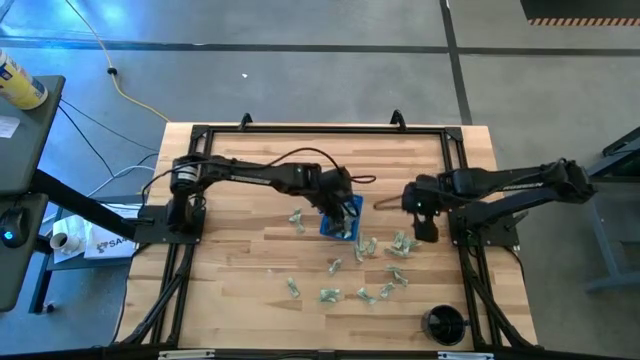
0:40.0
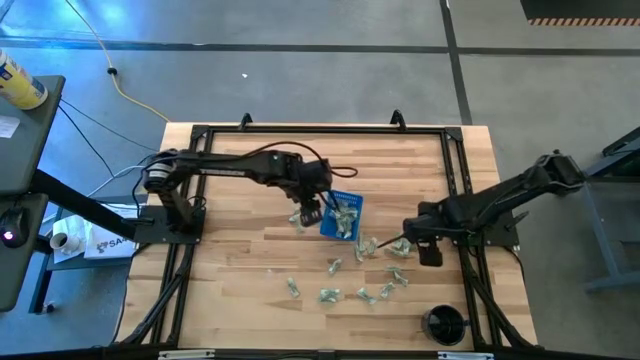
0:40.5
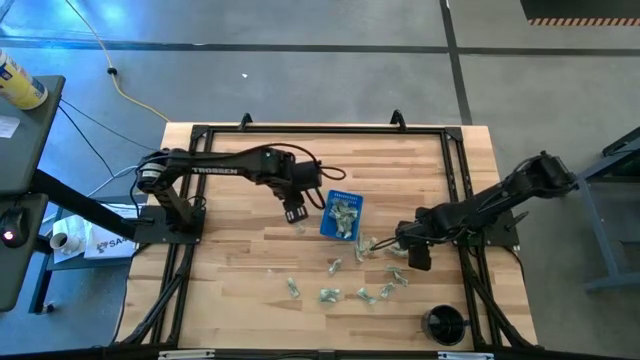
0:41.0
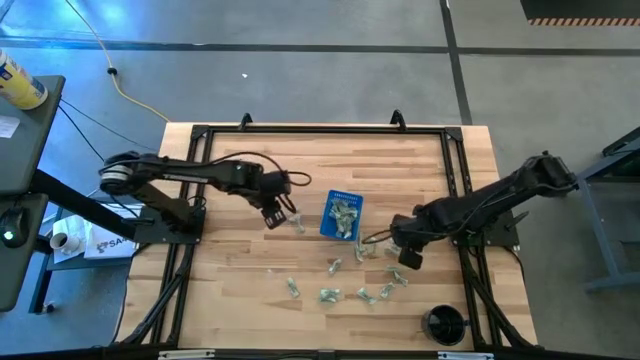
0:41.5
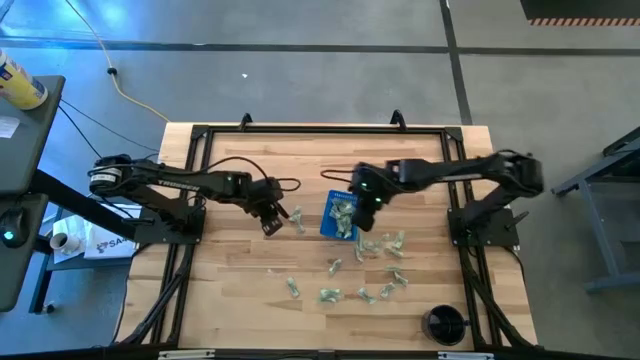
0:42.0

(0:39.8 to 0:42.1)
Task: Pick and place Stevia / Truvia into bins
Put the stevia packet into the blue basket

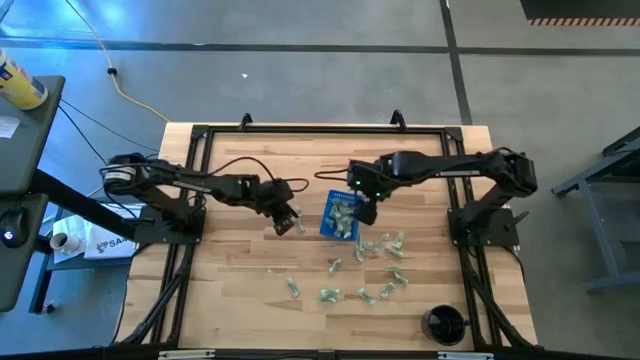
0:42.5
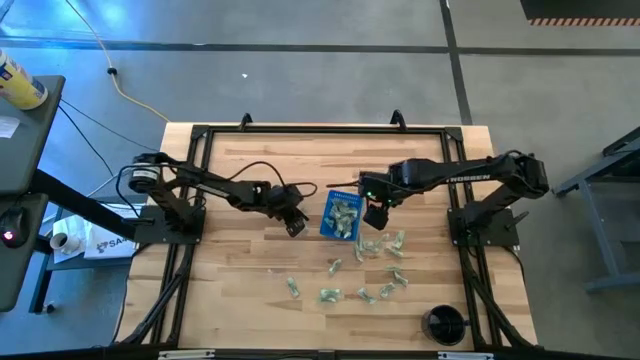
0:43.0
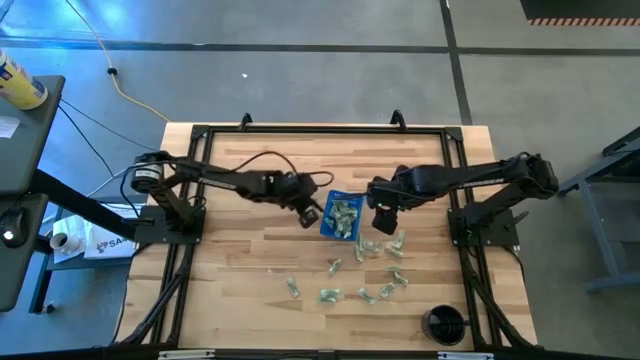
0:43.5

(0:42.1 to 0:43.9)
Put the stevia packet into the blue basket

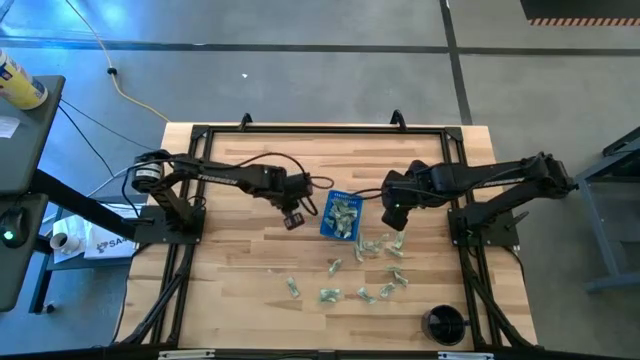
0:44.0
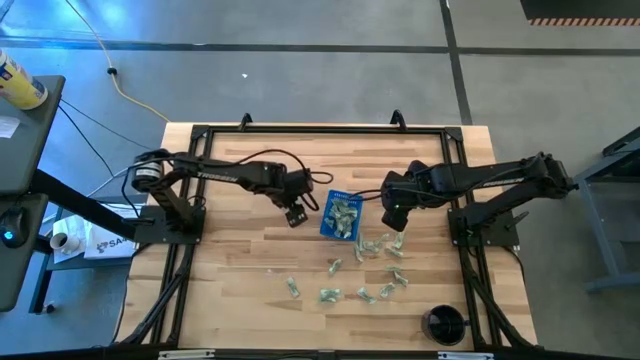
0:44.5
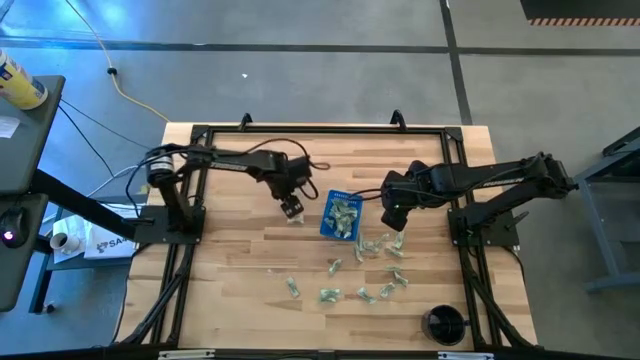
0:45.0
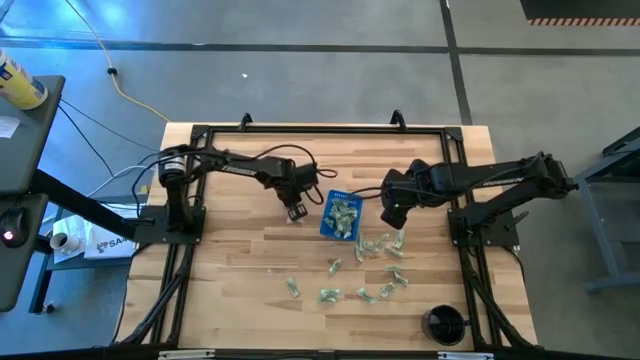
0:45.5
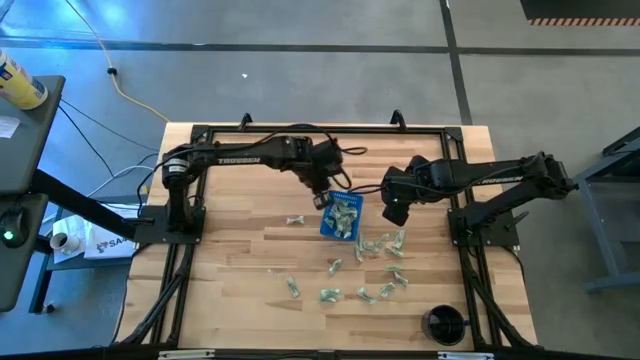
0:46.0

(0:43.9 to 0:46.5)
Put the stevia packet into the blue basket

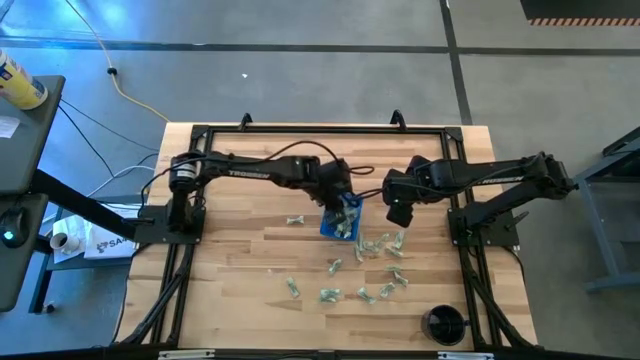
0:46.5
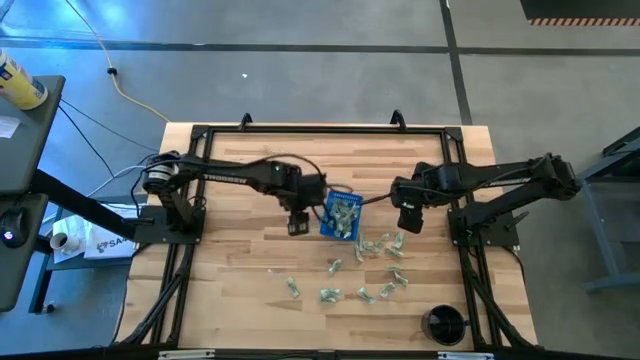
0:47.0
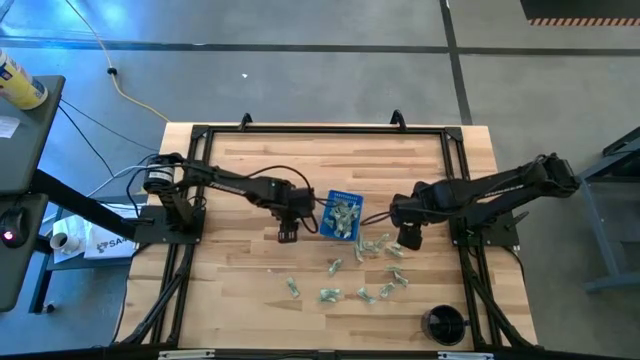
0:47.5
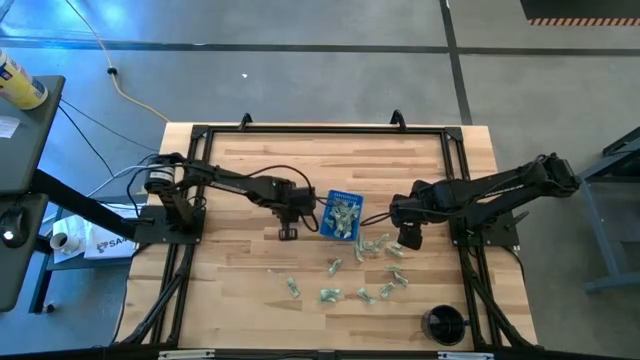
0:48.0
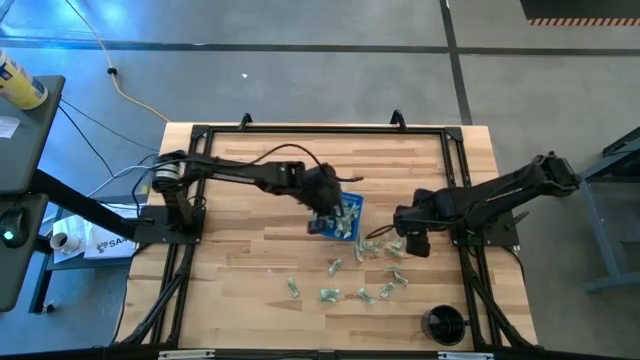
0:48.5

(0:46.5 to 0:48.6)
Put the stevia packet into the blue basket

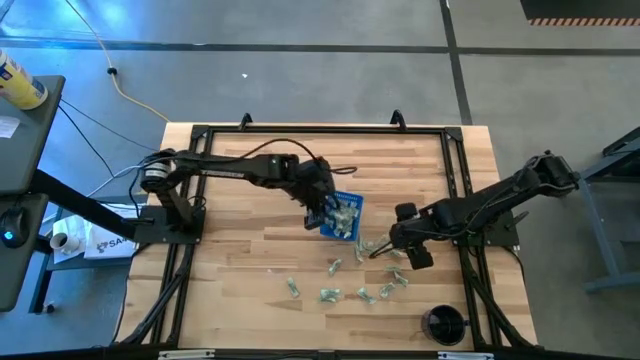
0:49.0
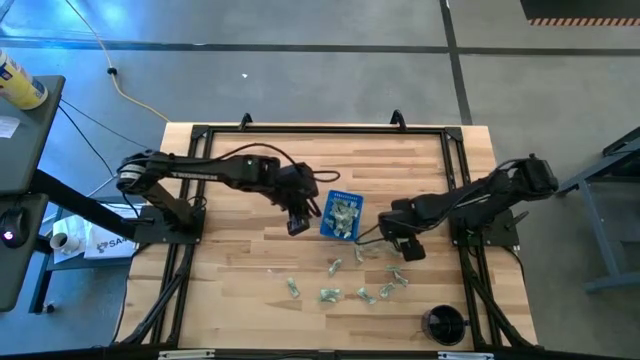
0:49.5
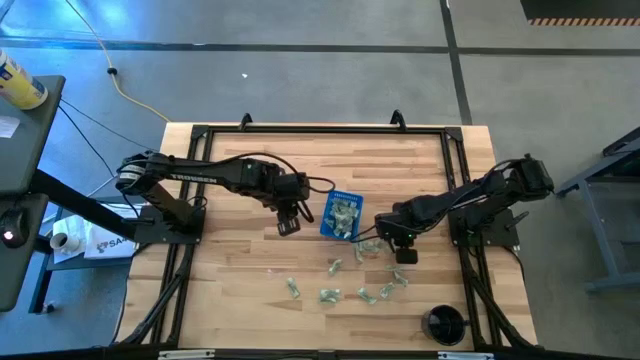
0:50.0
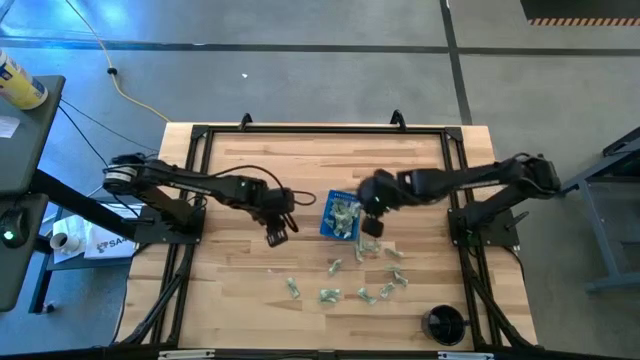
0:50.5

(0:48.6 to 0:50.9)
Put the stevia packet into the blue basket

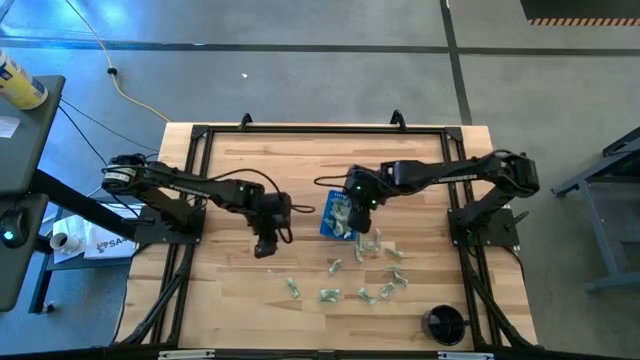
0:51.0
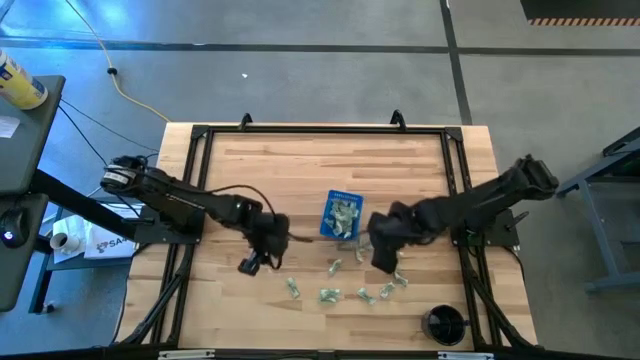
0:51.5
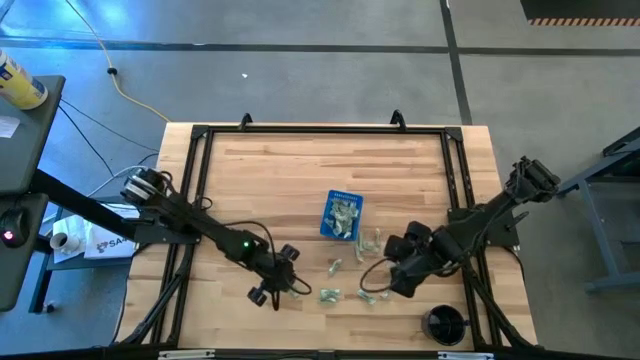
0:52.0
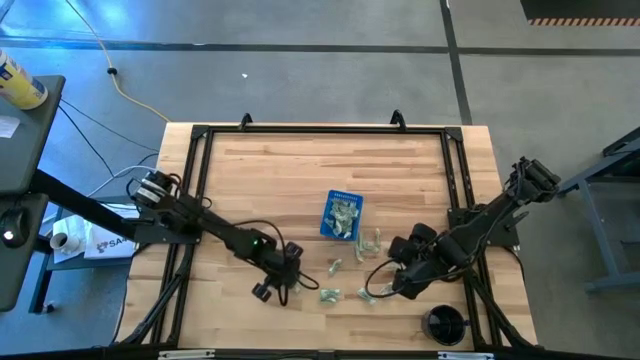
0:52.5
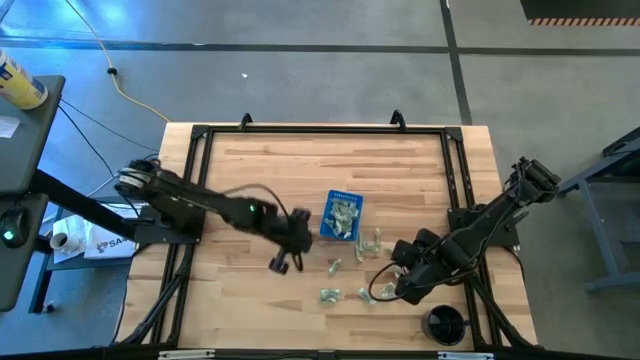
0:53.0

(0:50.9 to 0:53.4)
Put the stevia packet into the blue basket

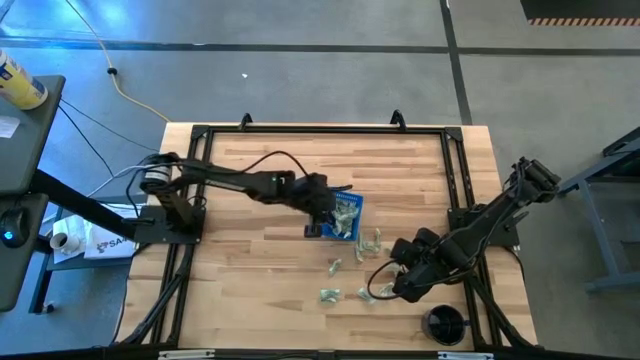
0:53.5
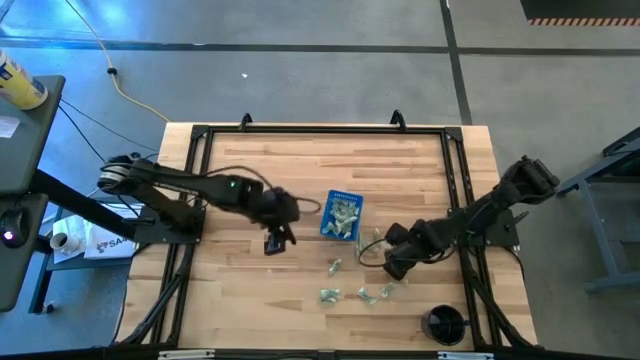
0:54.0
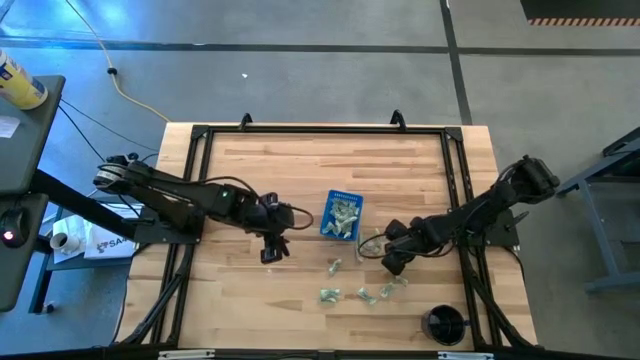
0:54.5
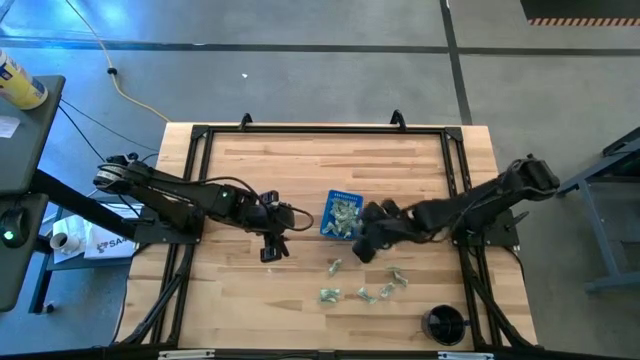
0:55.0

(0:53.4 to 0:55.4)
Put the stevia packet into the blue basket

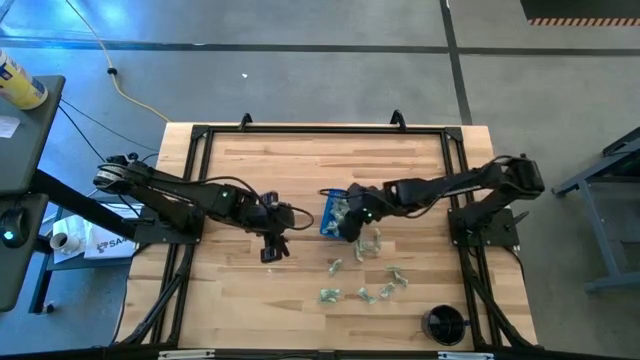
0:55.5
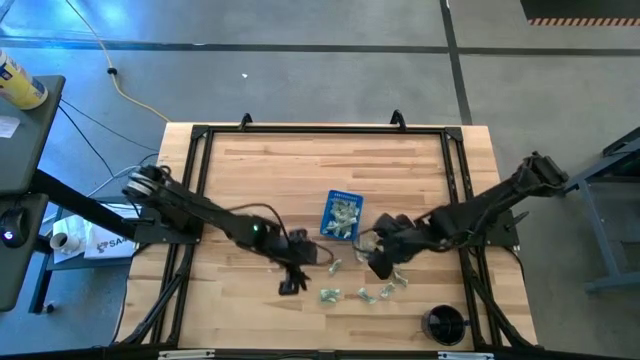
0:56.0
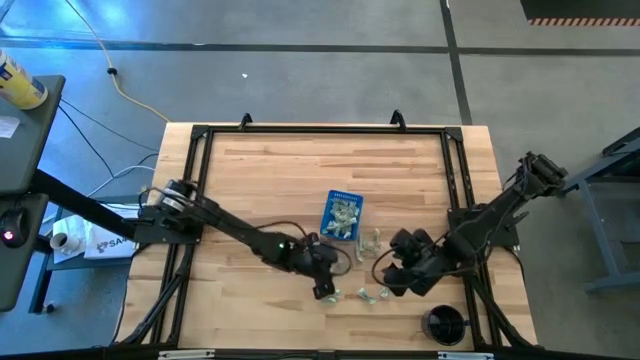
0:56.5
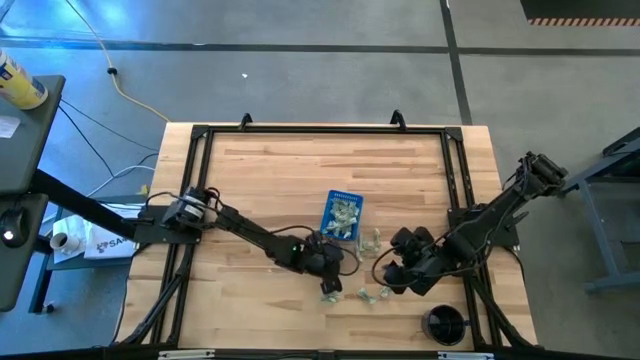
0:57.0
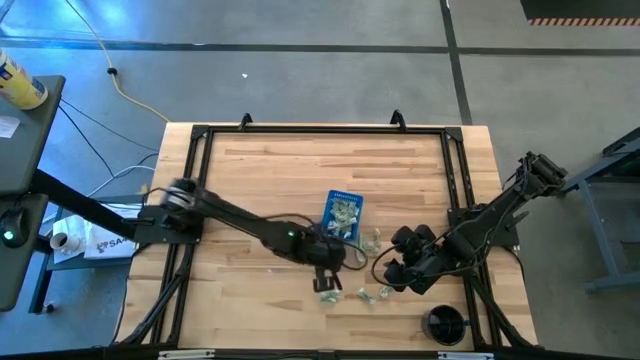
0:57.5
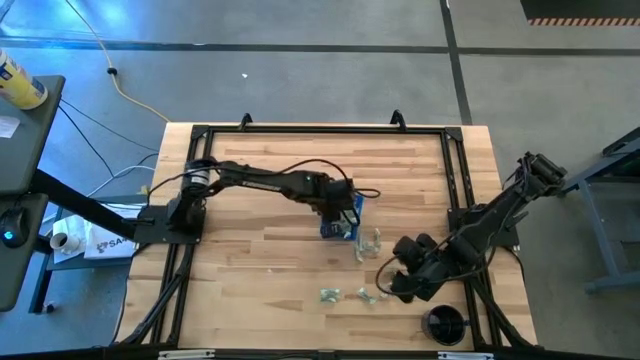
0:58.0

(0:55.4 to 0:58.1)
Put the stevia packet into the blue basket

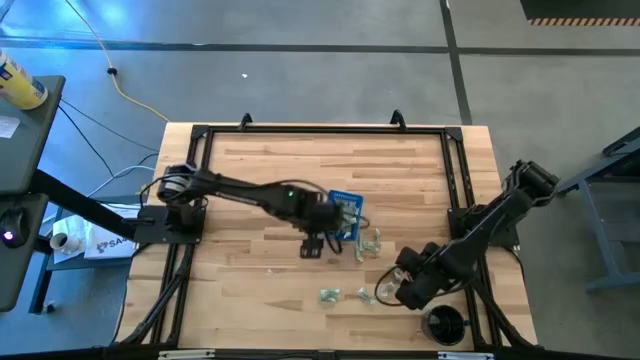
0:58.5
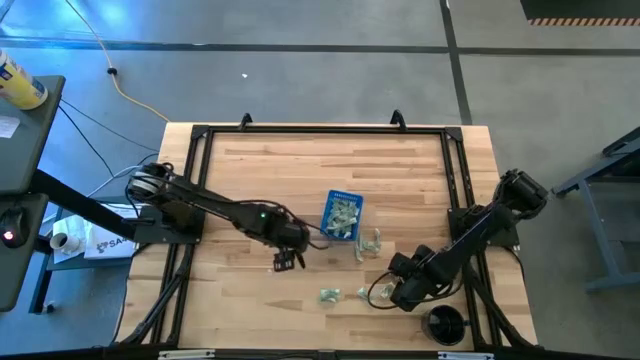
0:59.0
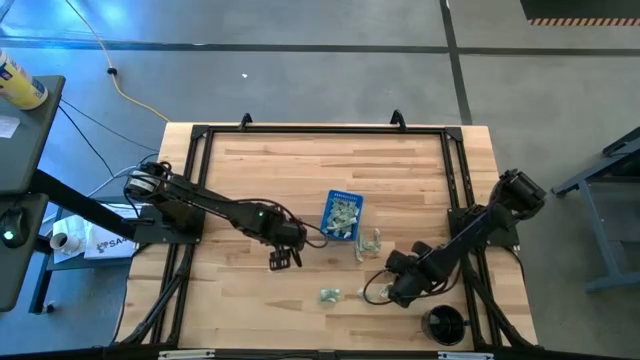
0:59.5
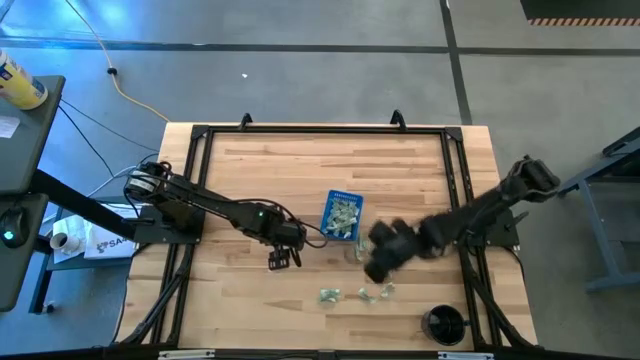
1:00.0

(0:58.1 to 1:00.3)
Put the stevia packet into the blue basket

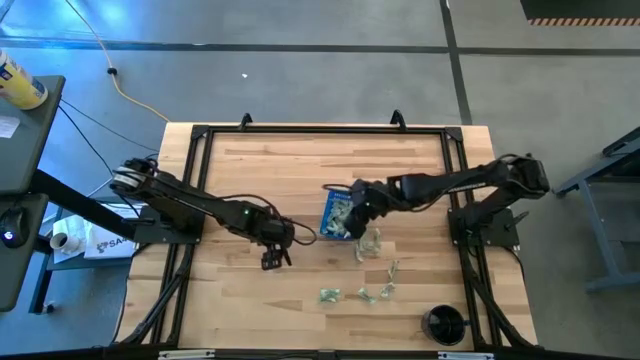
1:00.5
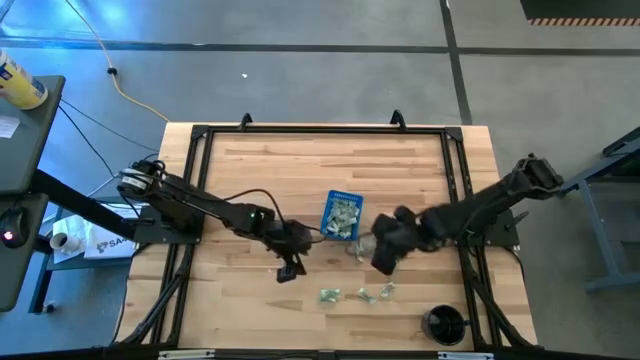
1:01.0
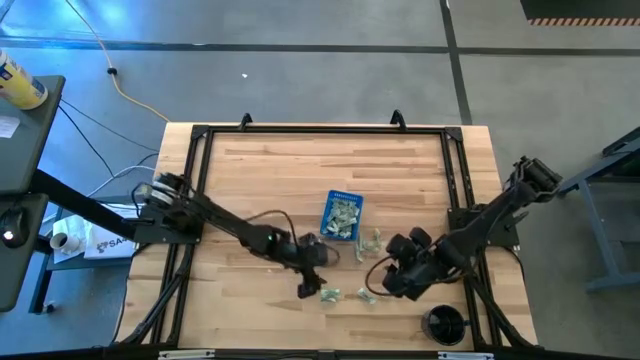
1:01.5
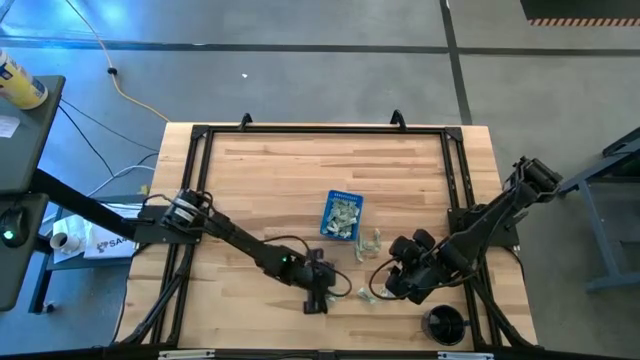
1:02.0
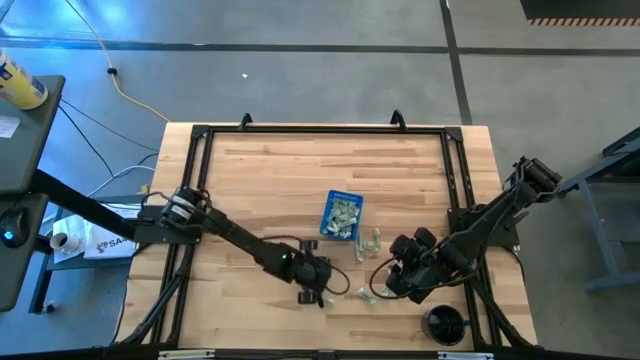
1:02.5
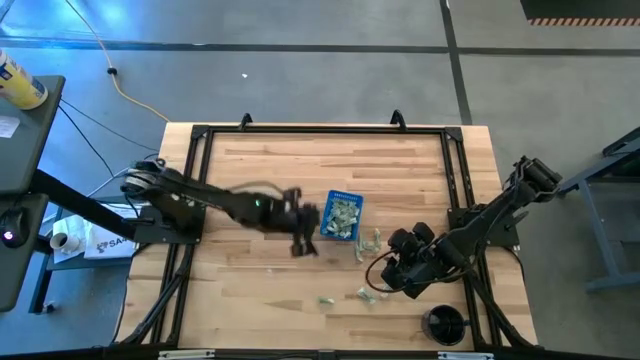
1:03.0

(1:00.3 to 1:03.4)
Put the stevia packet into the blue basket
